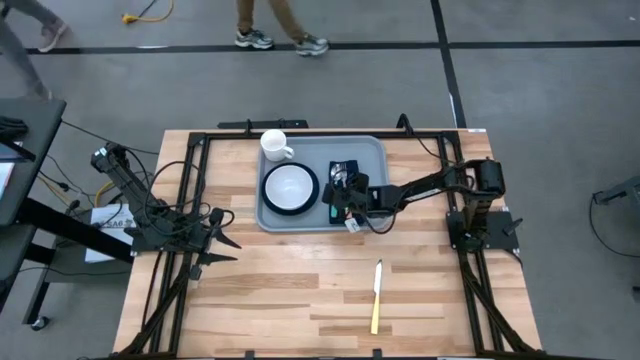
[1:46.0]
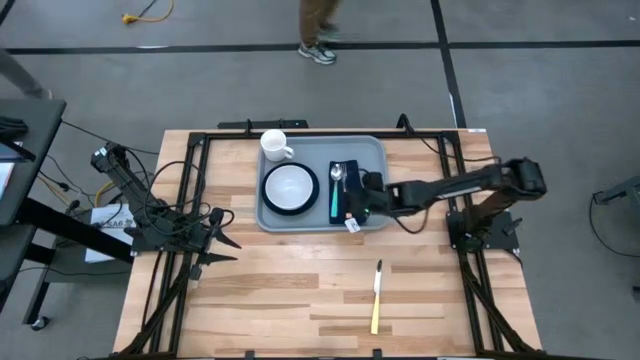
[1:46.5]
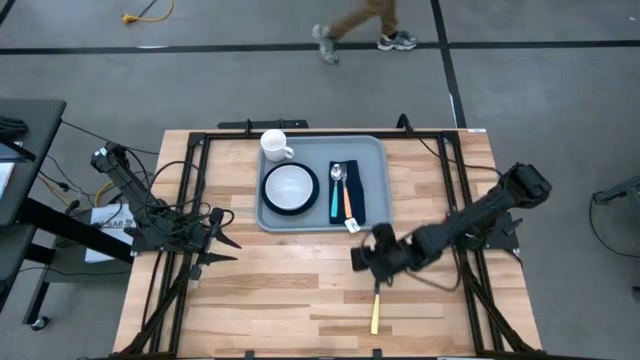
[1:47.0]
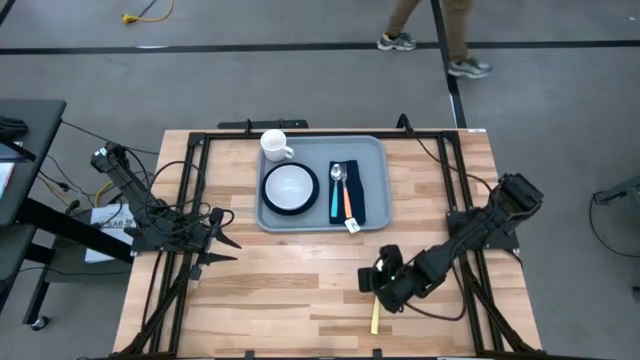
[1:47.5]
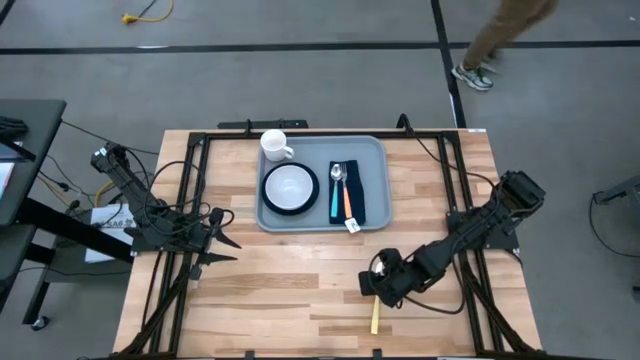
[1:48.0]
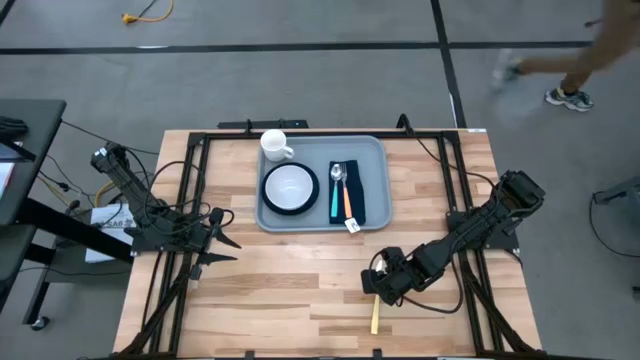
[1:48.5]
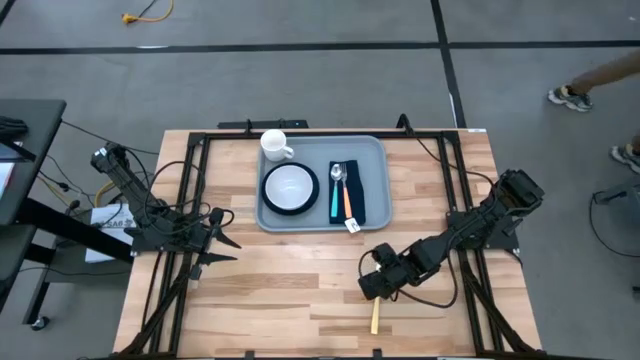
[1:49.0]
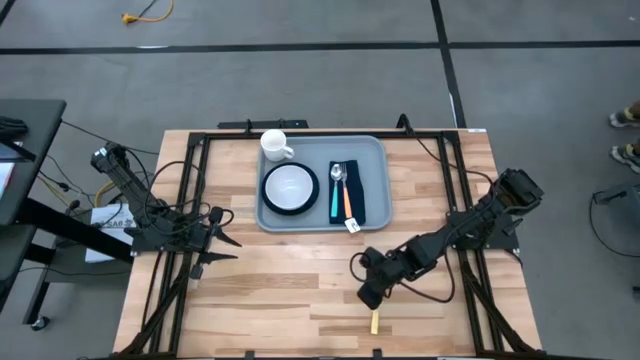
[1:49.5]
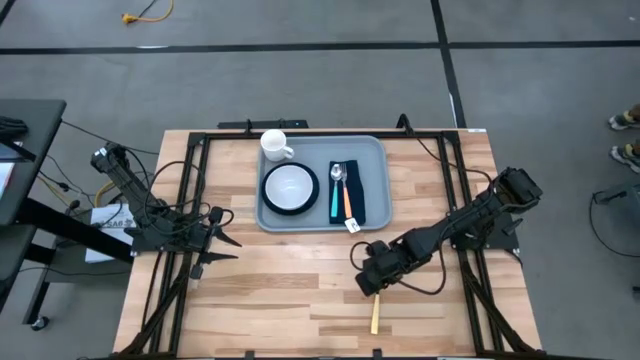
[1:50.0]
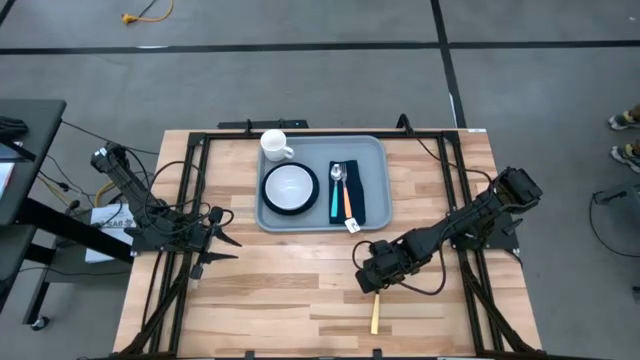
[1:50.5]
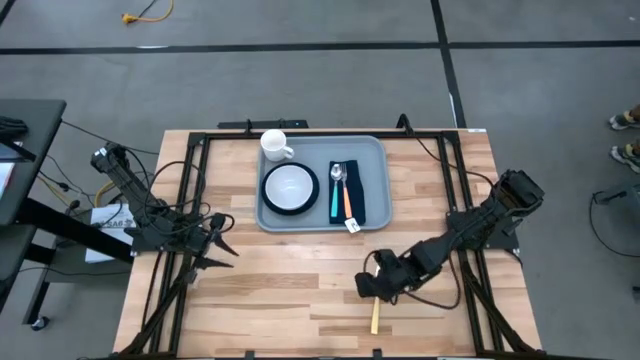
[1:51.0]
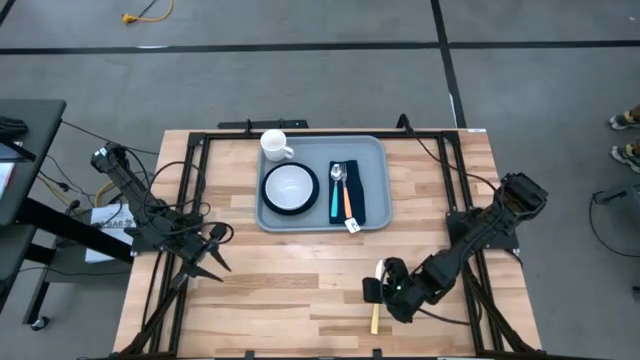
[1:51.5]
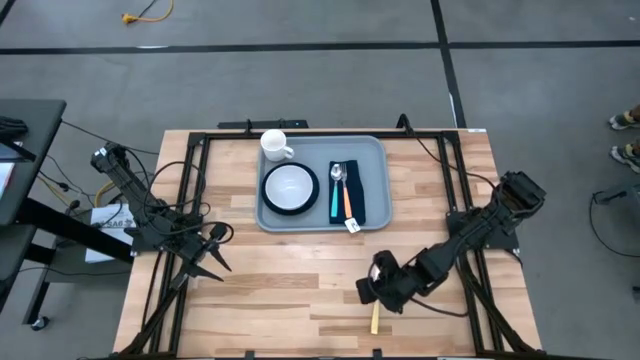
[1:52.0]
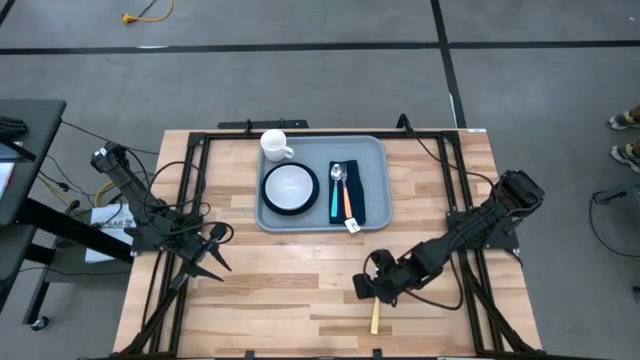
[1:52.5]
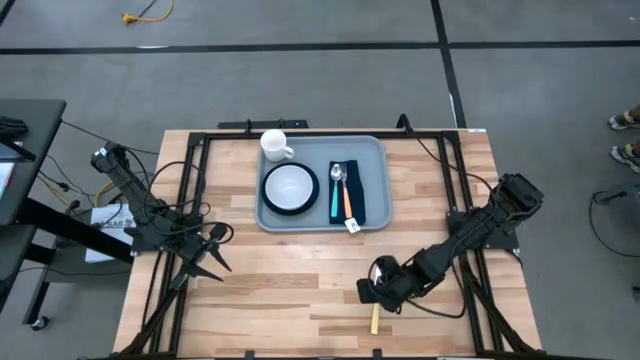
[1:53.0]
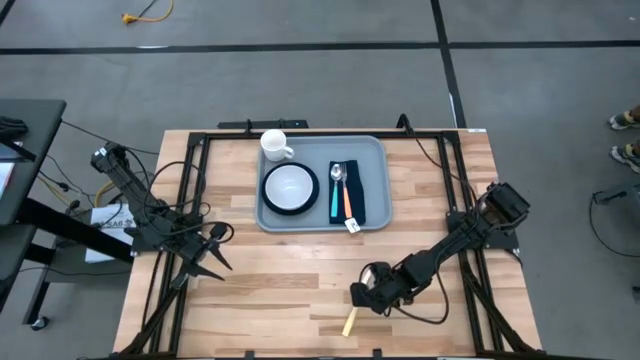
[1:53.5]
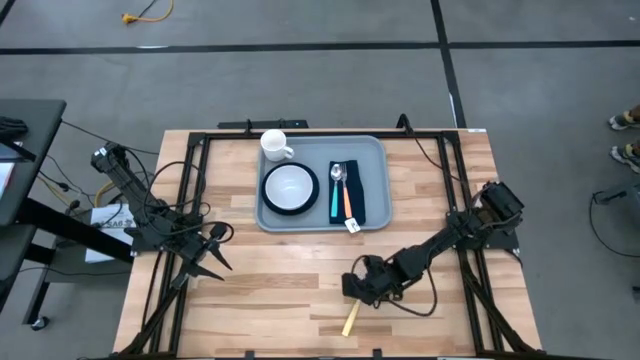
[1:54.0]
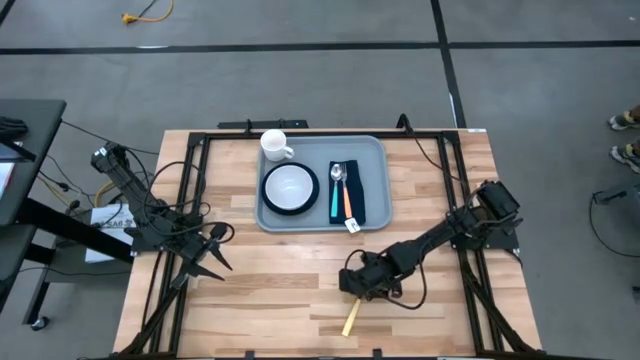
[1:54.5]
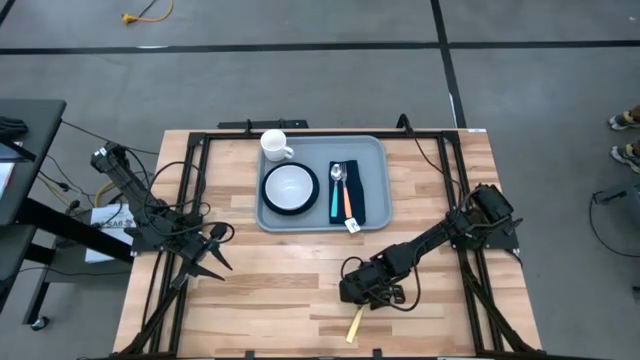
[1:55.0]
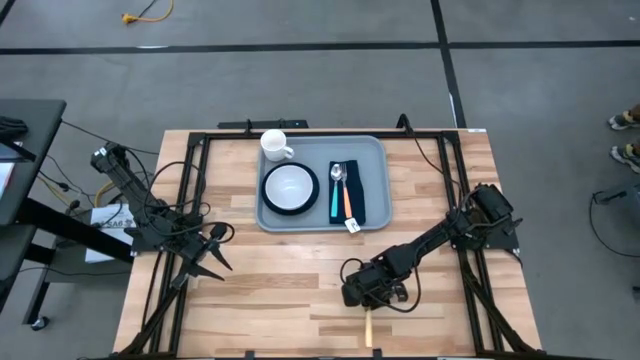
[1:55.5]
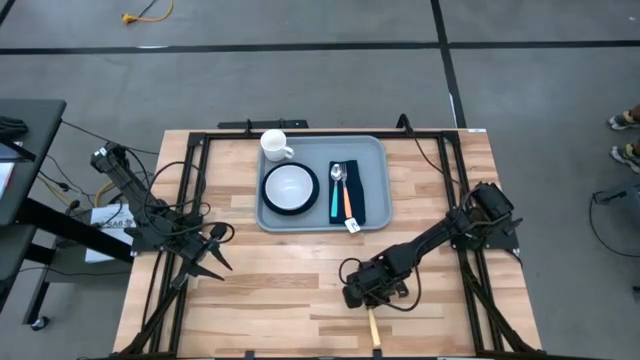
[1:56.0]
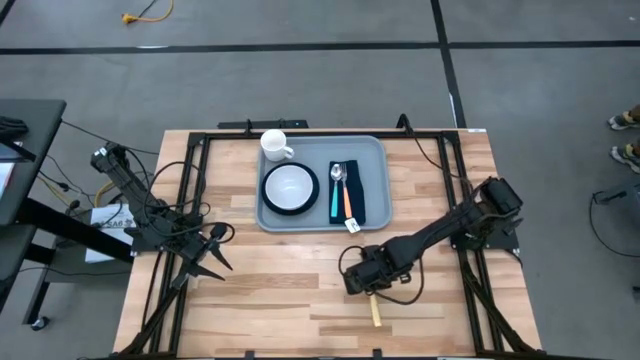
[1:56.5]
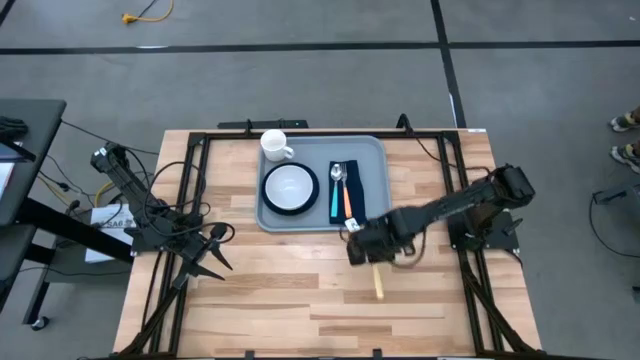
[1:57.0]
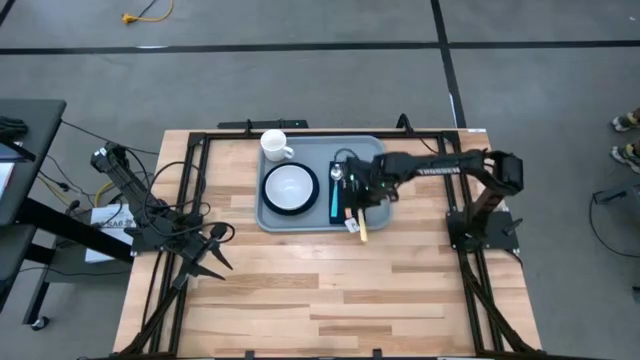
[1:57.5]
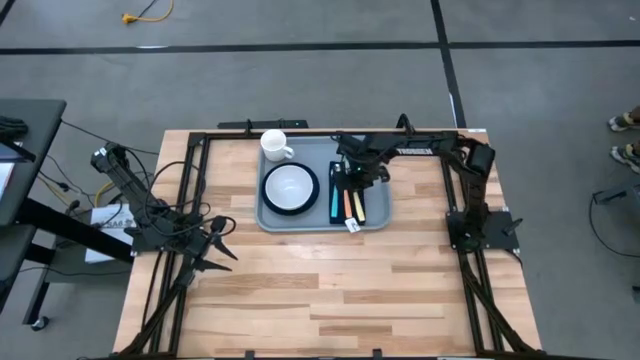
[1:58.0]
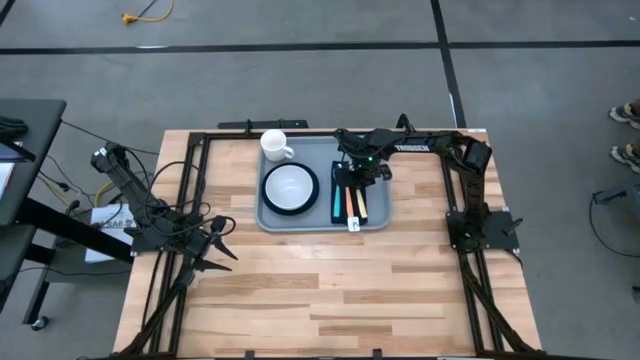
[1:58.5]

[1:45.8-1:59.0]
Task: Set up tray
Put the yellow knife on the dark blue napkin to the right of the orange fork

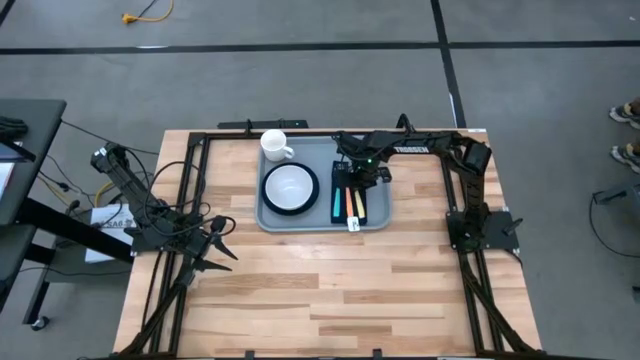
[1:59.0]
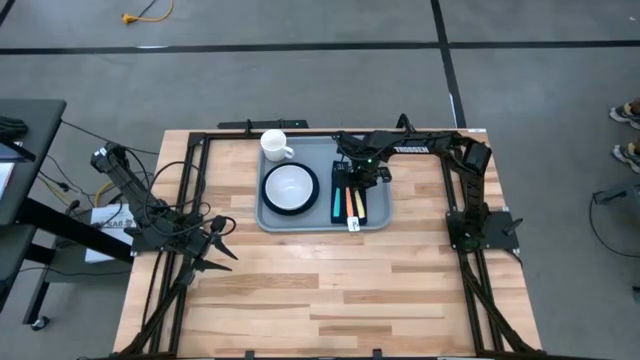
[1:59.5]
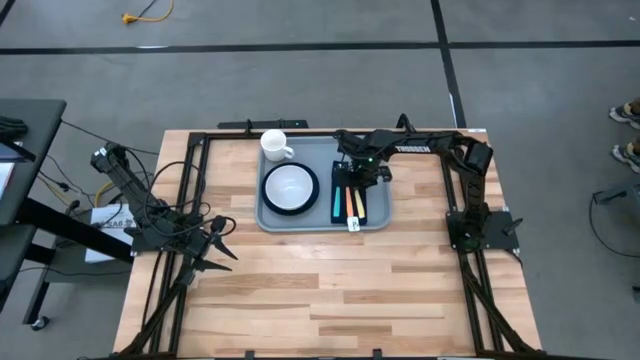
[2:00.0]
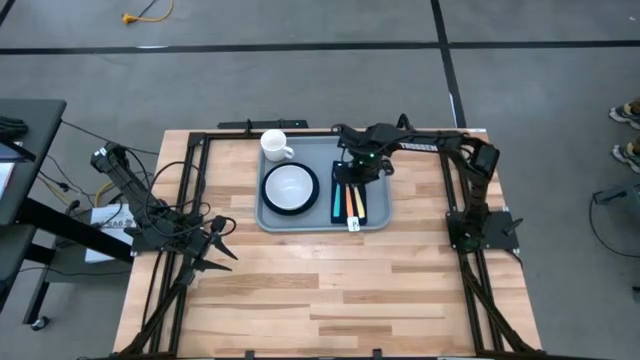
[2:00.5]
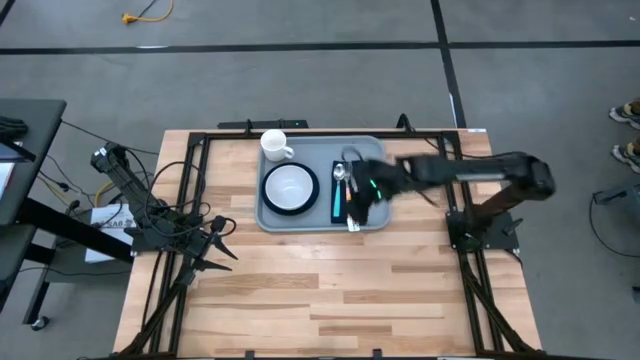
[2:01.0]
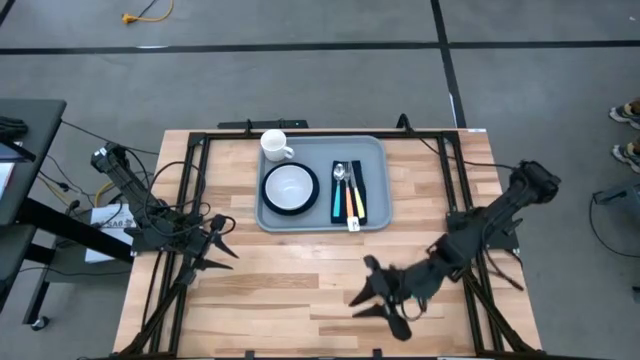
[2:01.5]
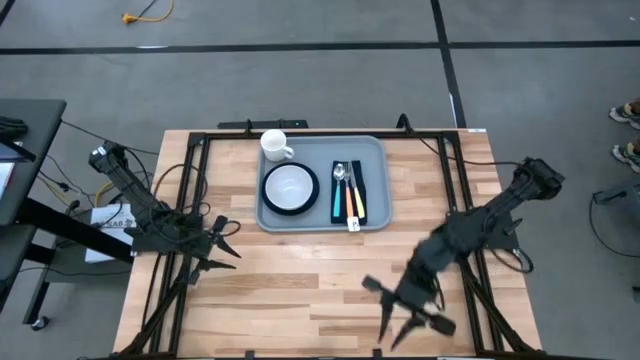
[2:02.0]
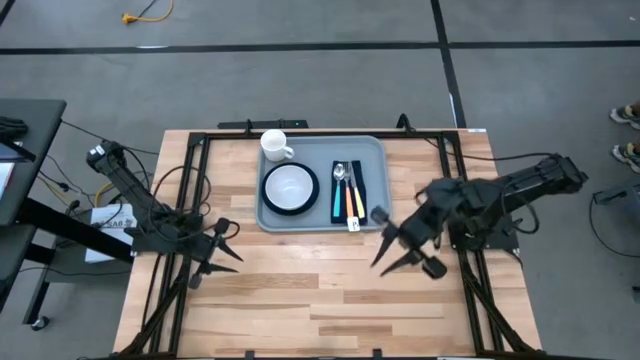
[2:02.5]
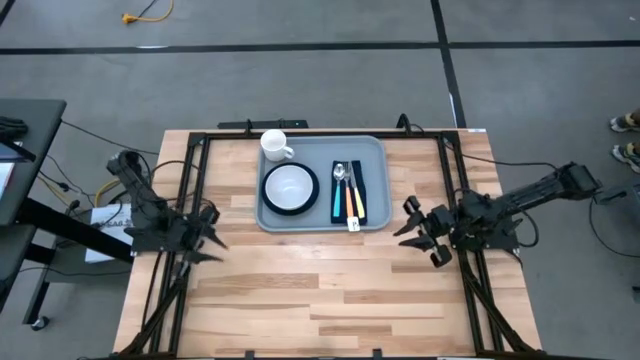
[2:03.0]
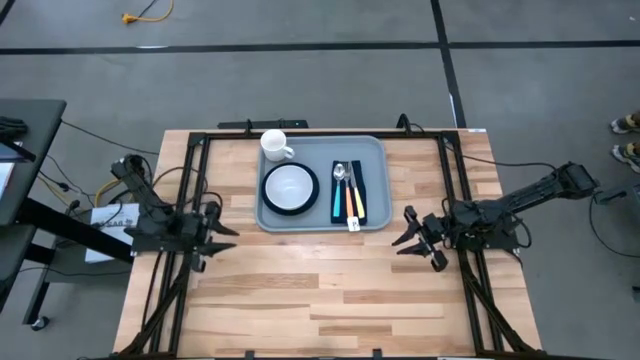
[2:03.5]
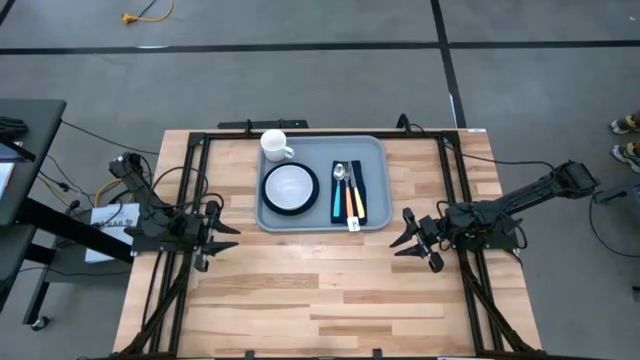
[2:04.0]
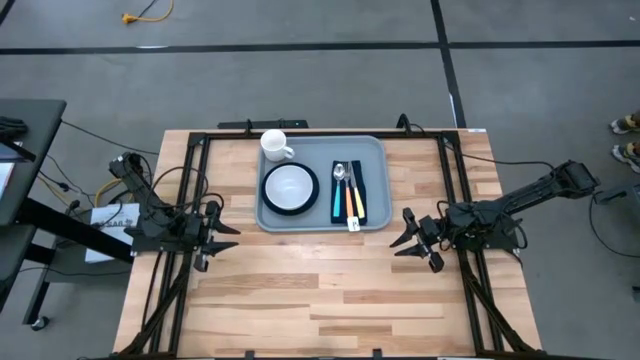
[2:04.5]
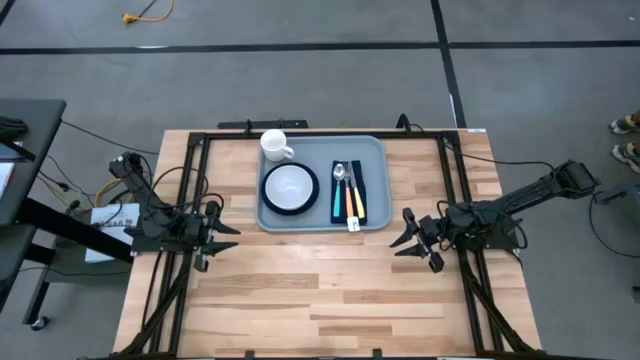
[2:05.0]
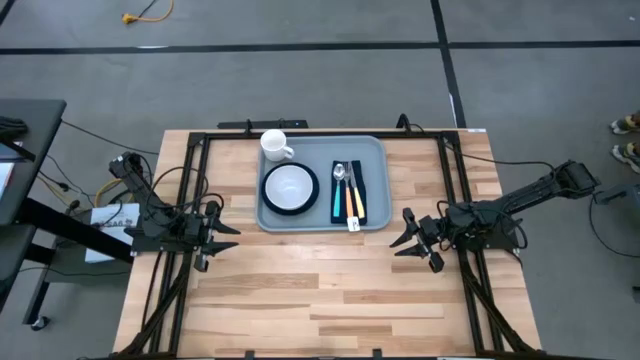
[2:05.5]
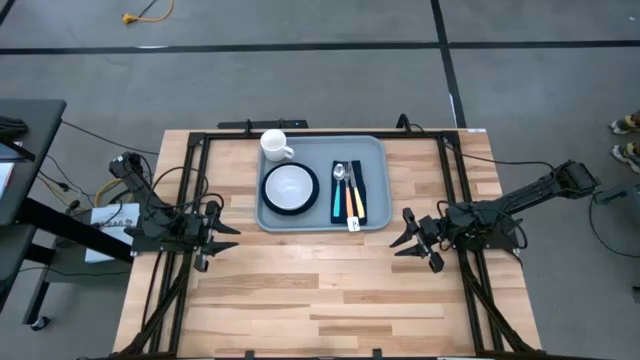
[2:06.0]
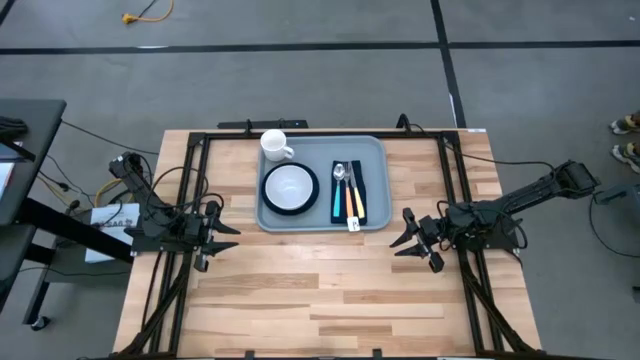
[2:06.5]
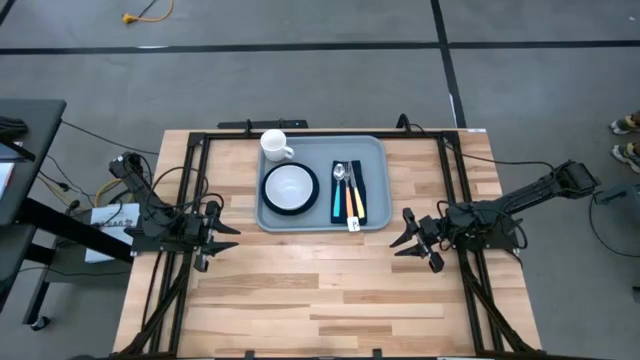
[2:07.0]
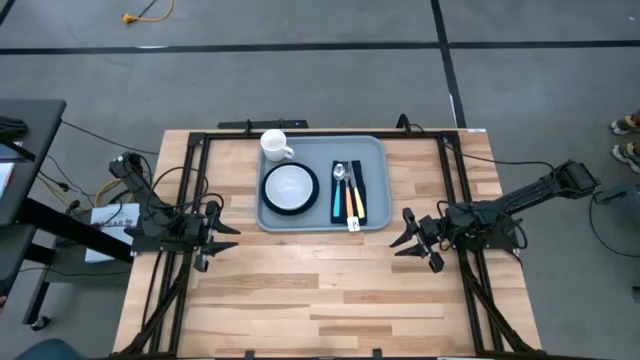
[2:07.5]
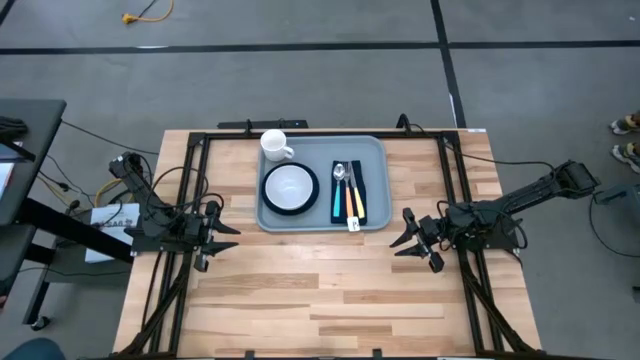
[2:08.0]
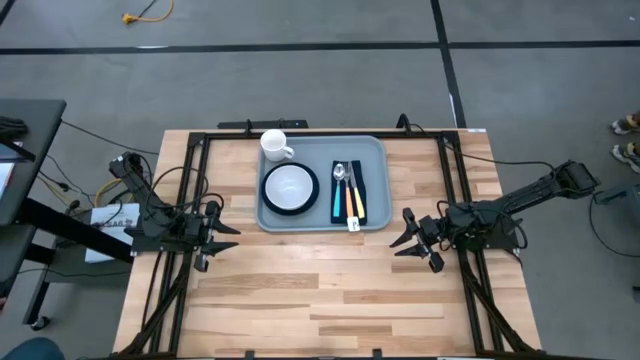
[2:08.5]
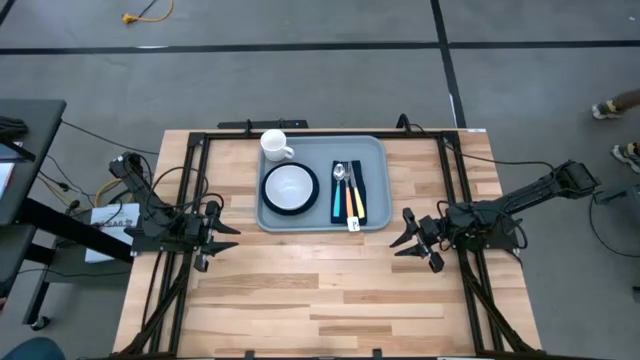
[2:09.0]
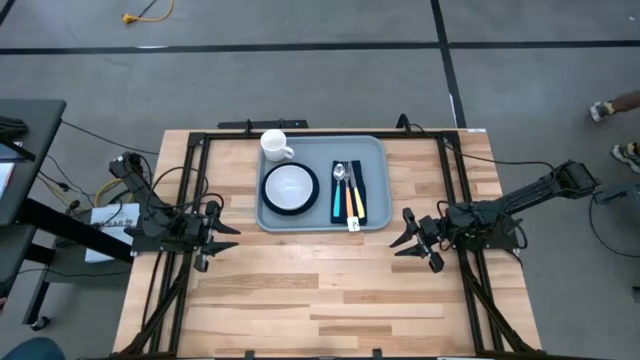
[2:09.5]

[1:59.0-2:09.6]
Return to Home Position
